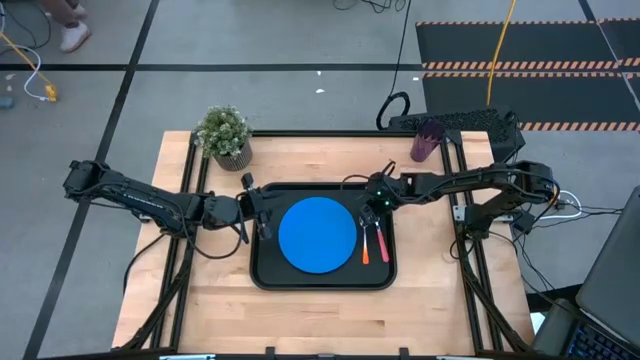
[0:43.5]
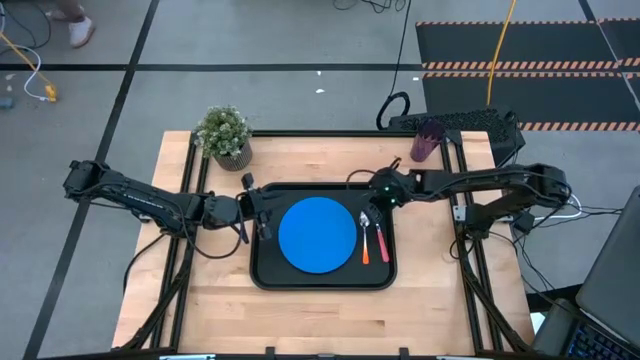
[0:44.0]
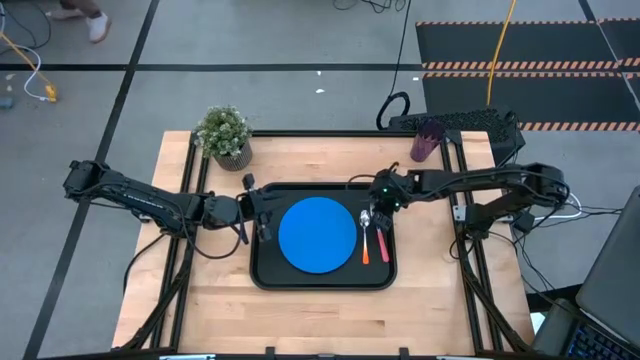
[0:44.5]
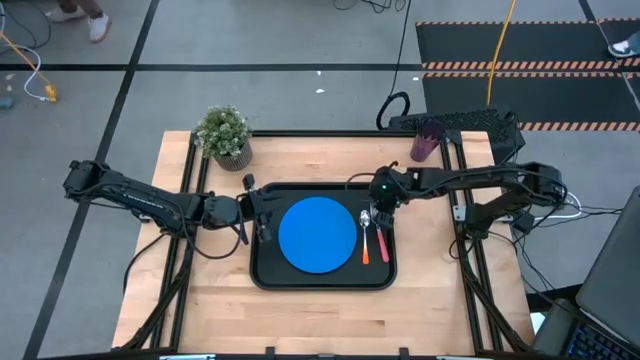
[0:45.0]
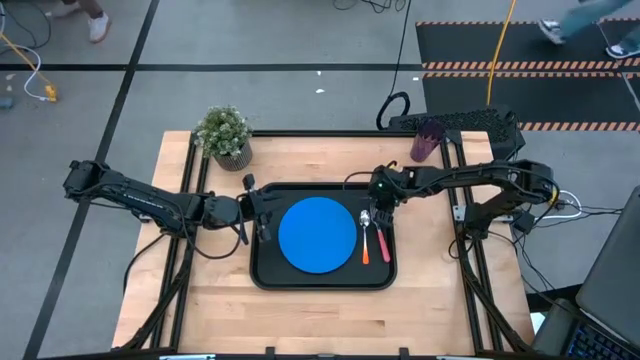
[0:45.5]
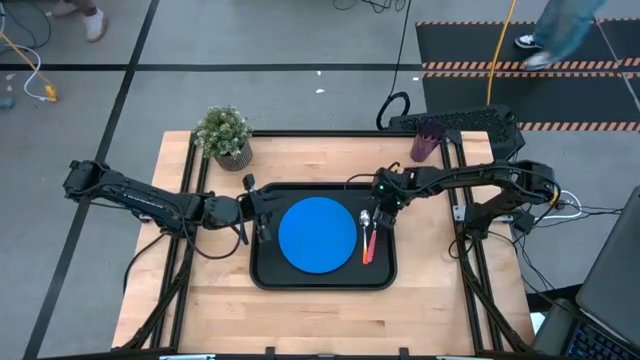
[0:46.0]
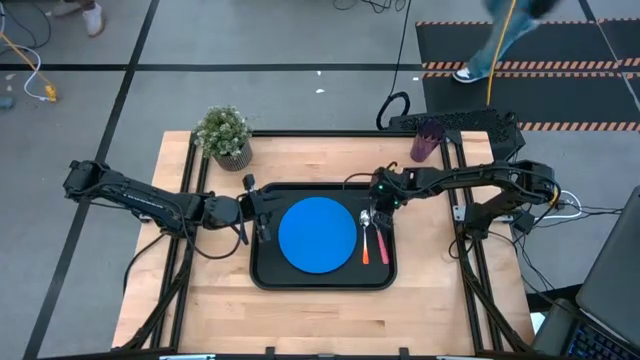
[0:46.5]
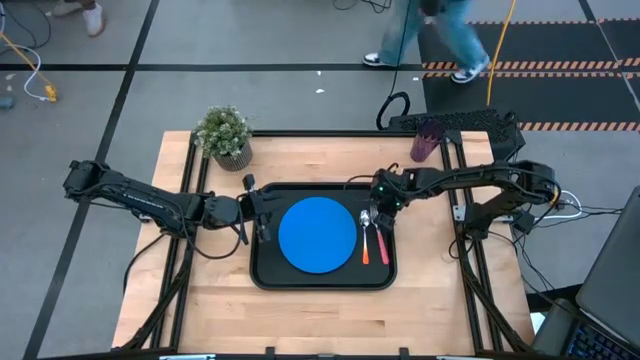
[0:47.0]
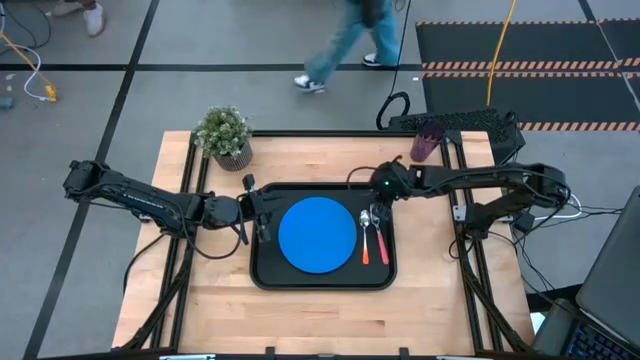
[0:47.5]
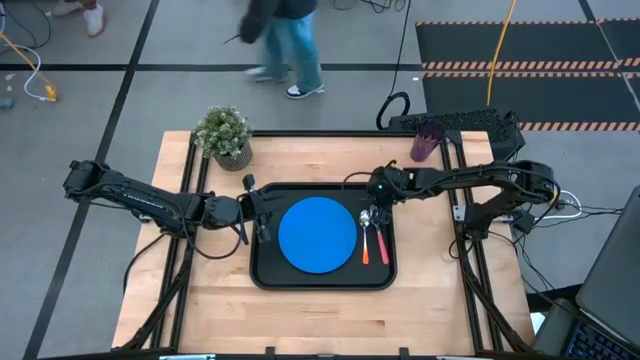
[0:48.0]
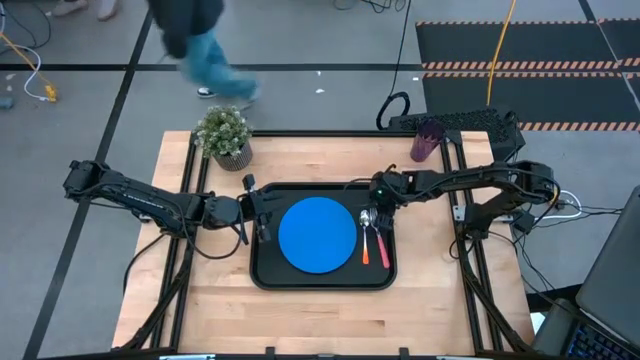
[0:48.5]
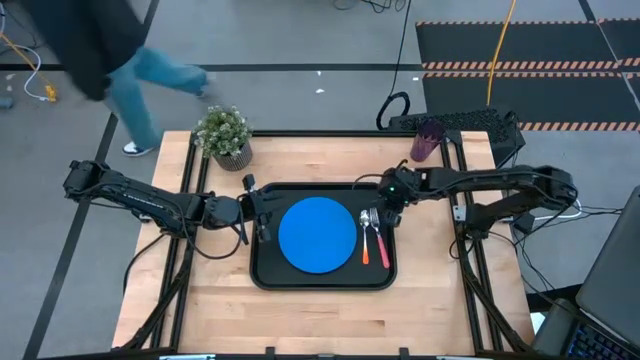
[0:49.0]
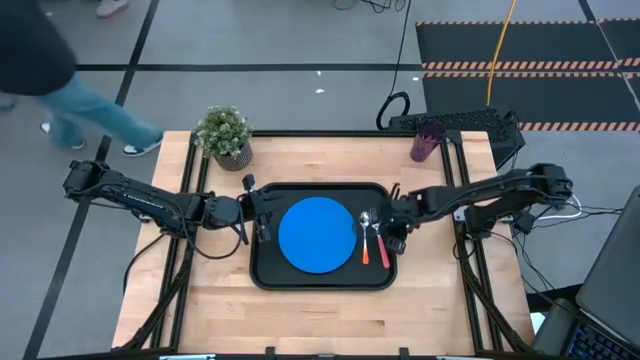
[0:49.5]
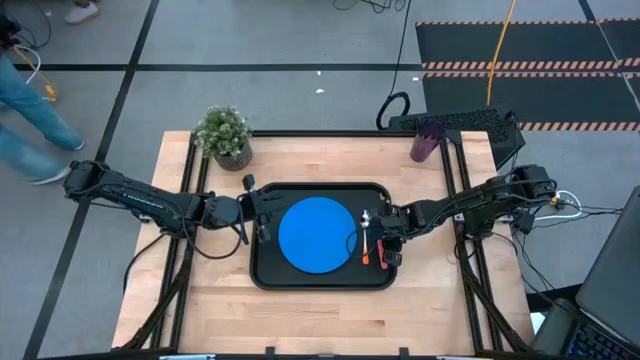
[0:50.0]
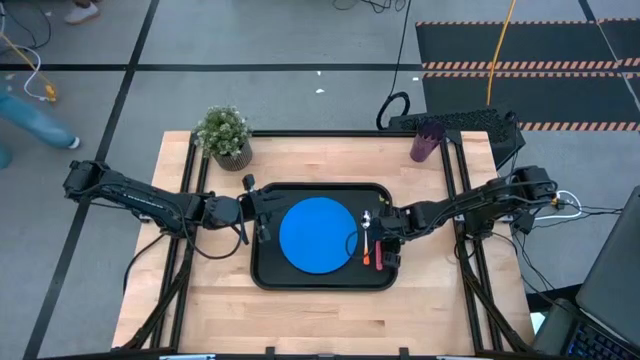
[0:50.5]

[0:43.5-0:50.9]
Task: Pick and place plate/cup/fork/spoon on tray
Adjust the pink fork on the black tray
